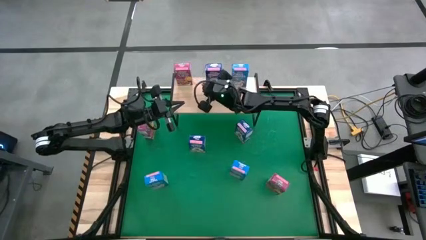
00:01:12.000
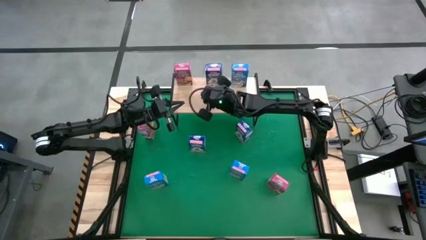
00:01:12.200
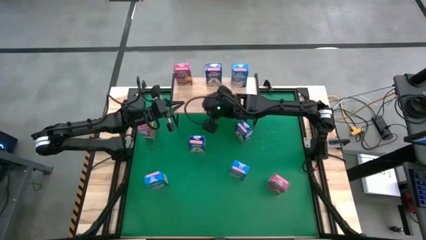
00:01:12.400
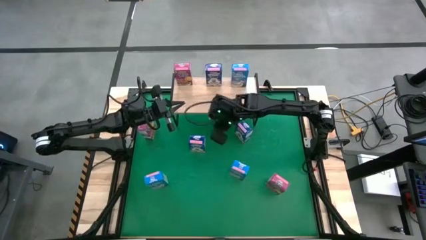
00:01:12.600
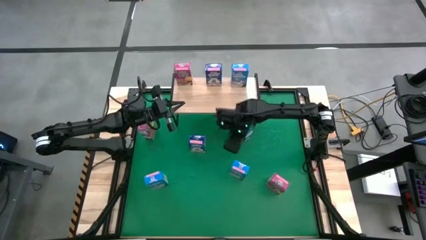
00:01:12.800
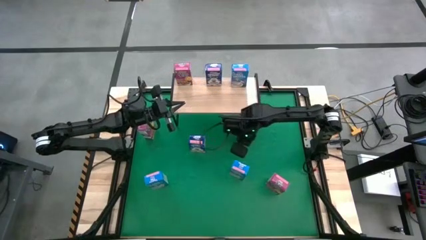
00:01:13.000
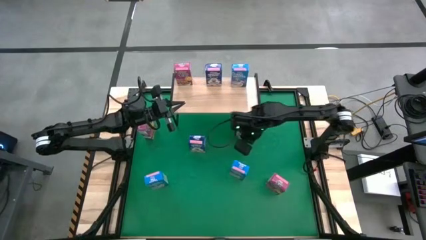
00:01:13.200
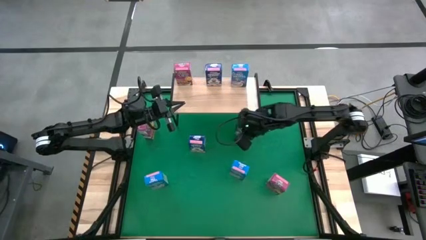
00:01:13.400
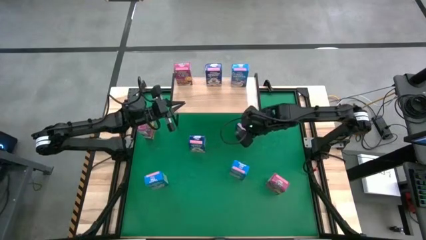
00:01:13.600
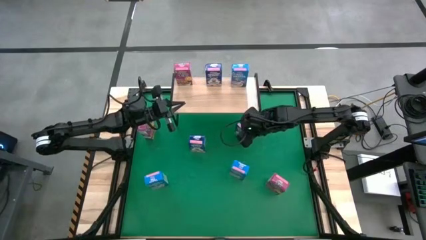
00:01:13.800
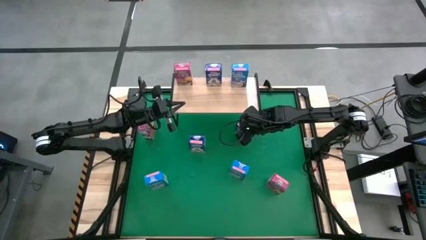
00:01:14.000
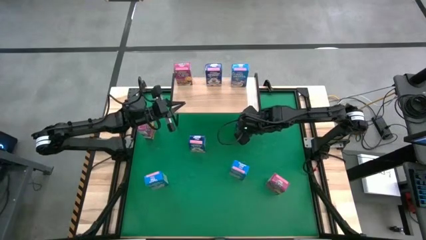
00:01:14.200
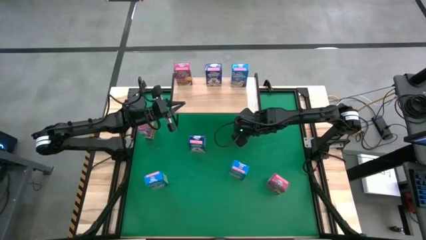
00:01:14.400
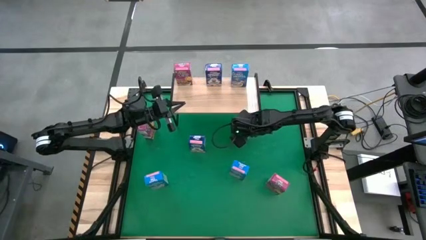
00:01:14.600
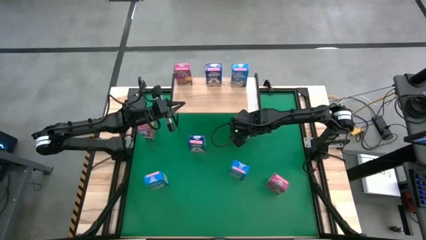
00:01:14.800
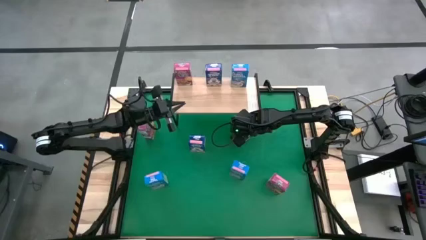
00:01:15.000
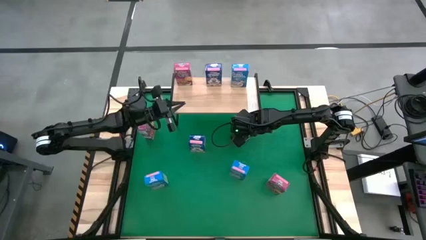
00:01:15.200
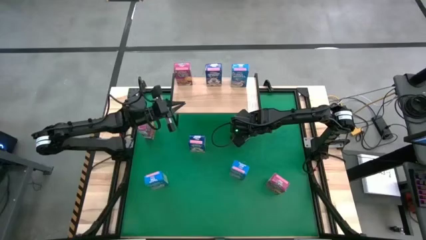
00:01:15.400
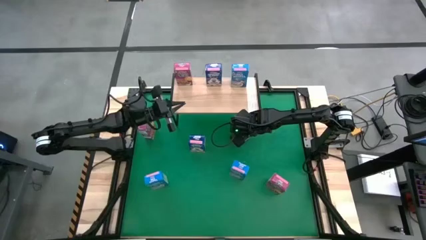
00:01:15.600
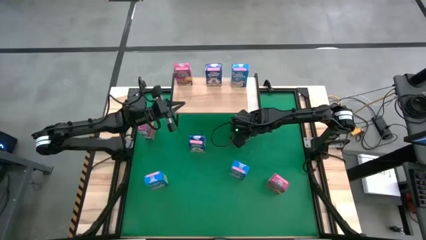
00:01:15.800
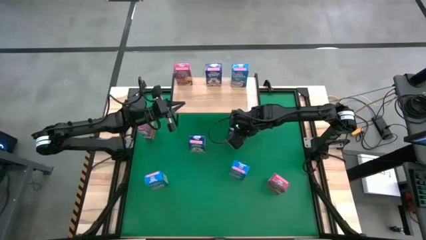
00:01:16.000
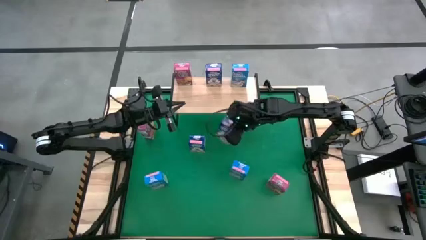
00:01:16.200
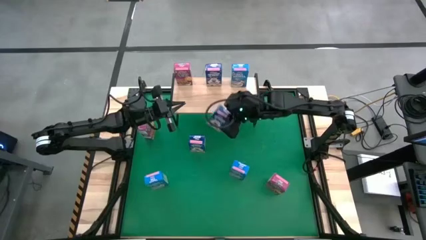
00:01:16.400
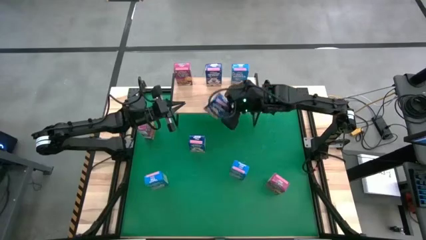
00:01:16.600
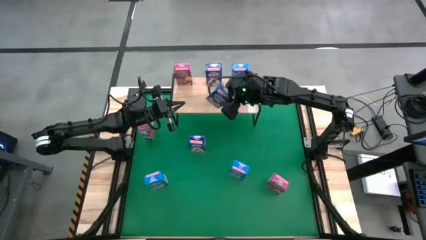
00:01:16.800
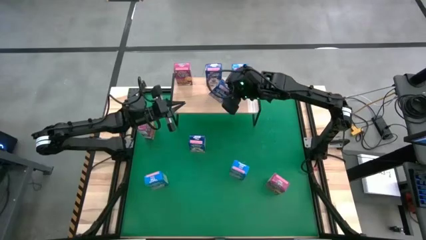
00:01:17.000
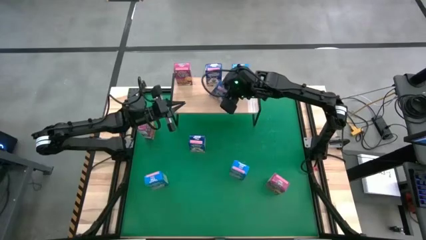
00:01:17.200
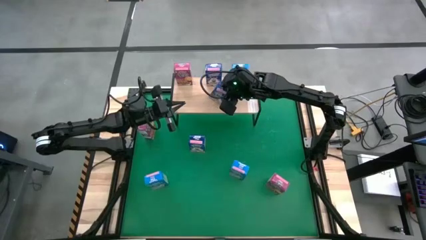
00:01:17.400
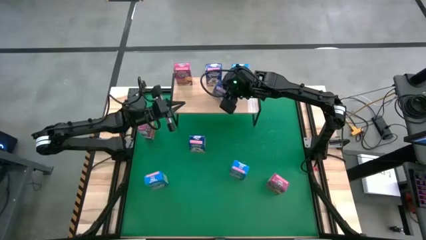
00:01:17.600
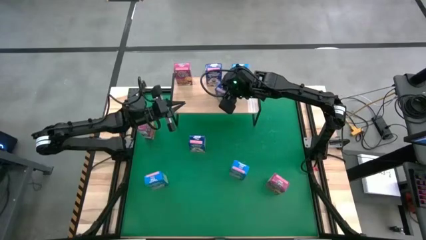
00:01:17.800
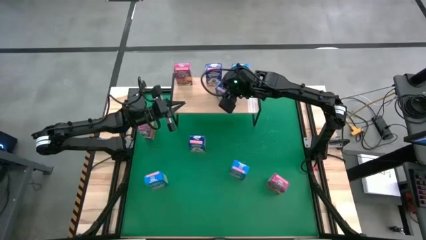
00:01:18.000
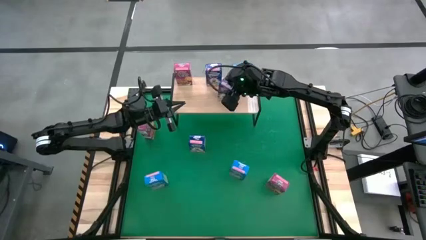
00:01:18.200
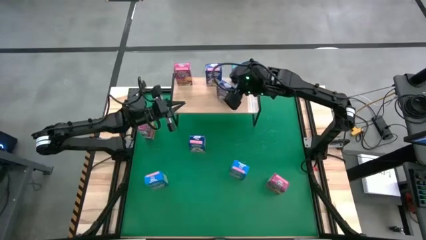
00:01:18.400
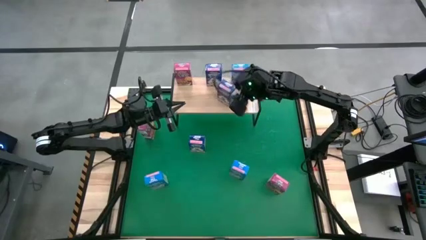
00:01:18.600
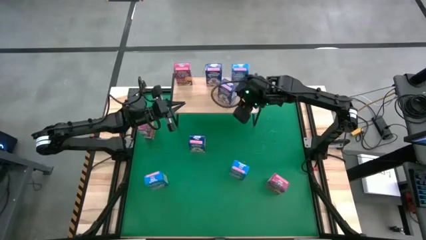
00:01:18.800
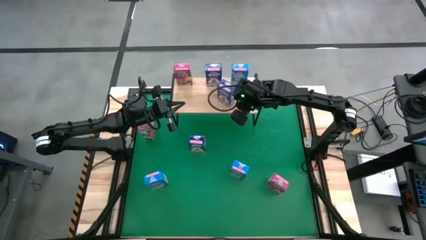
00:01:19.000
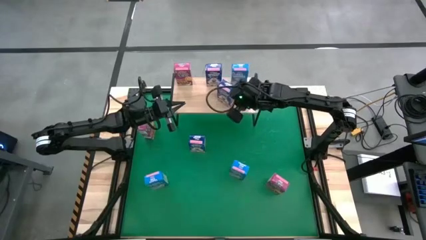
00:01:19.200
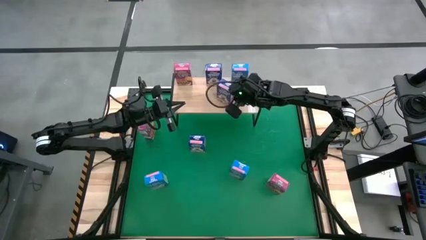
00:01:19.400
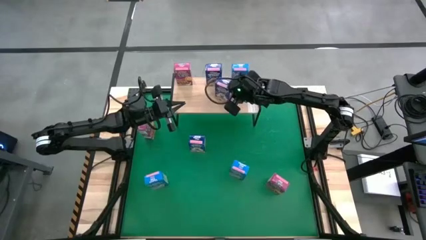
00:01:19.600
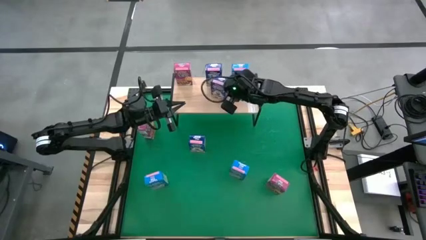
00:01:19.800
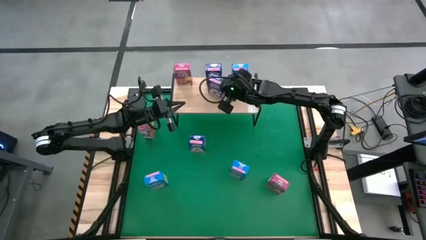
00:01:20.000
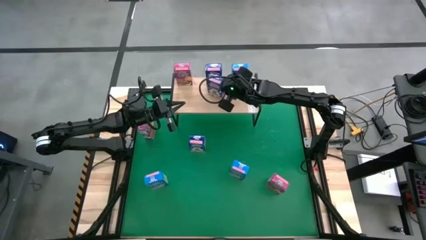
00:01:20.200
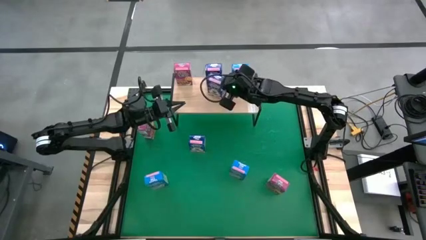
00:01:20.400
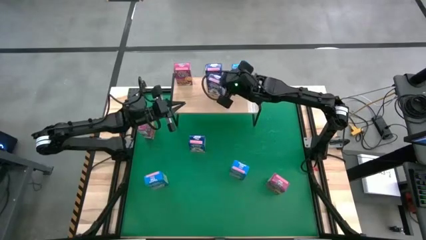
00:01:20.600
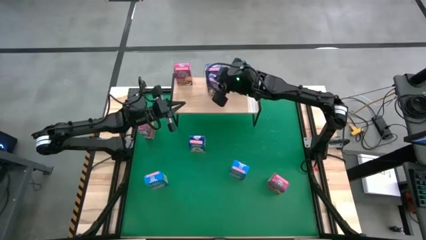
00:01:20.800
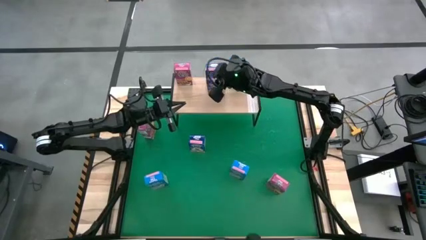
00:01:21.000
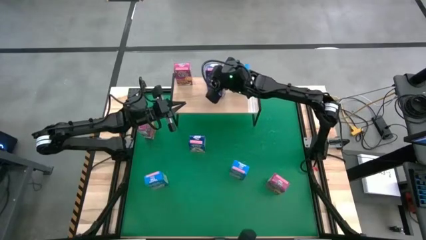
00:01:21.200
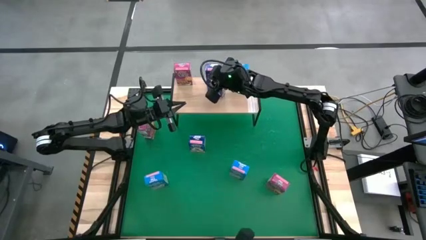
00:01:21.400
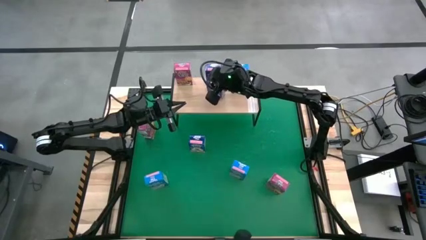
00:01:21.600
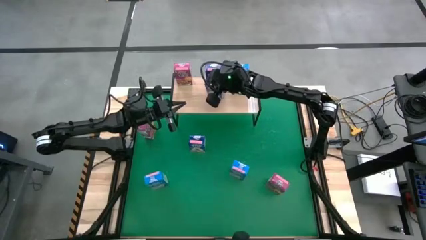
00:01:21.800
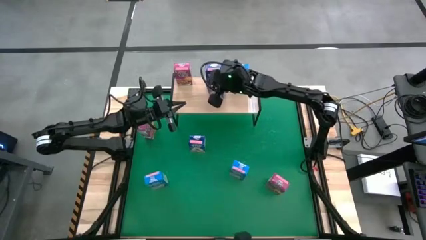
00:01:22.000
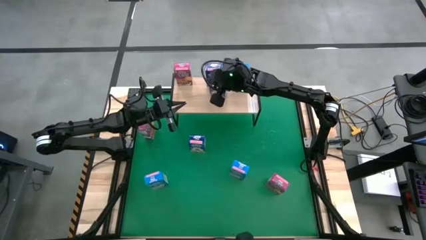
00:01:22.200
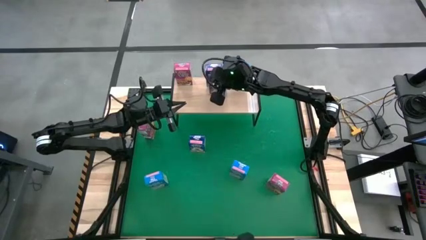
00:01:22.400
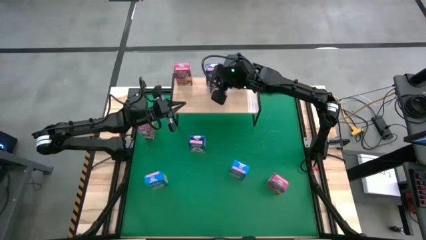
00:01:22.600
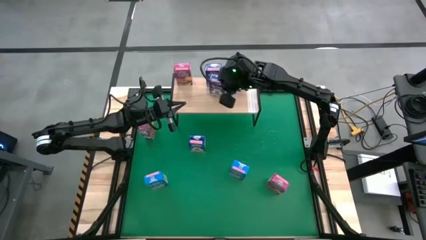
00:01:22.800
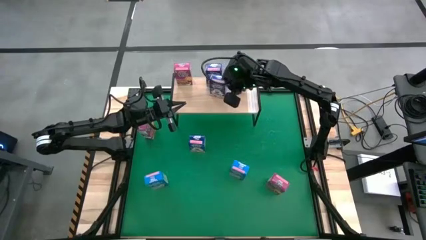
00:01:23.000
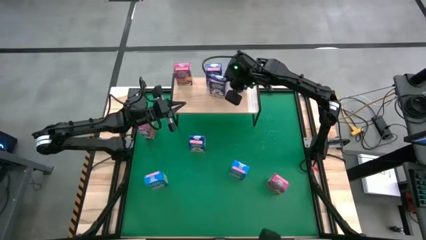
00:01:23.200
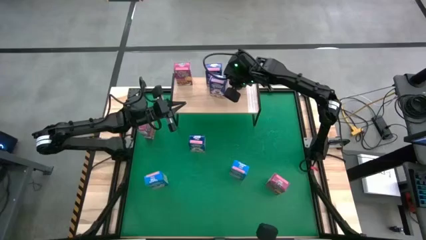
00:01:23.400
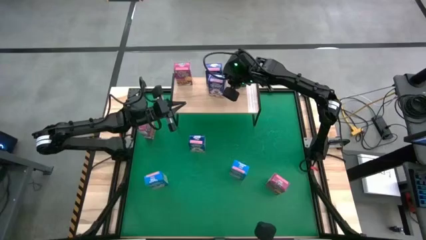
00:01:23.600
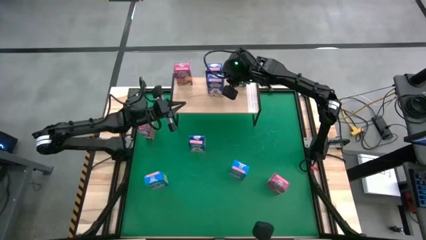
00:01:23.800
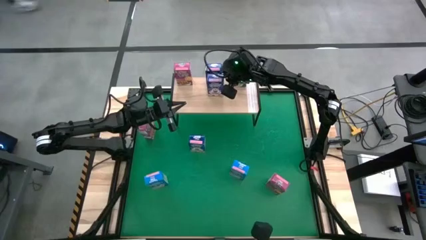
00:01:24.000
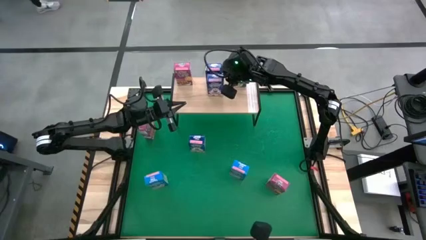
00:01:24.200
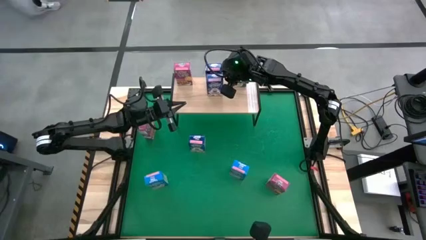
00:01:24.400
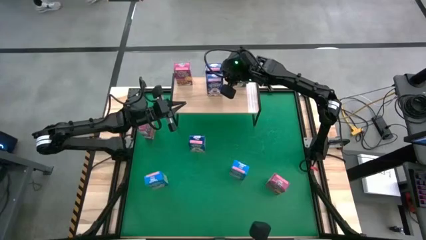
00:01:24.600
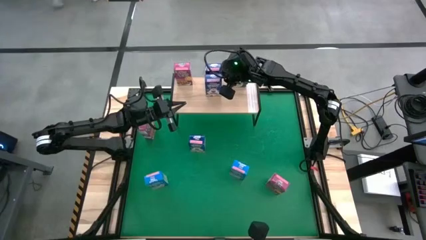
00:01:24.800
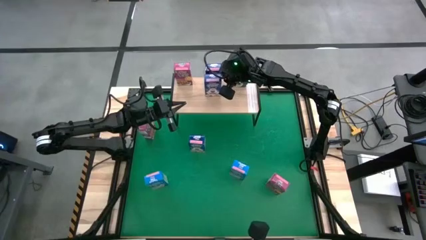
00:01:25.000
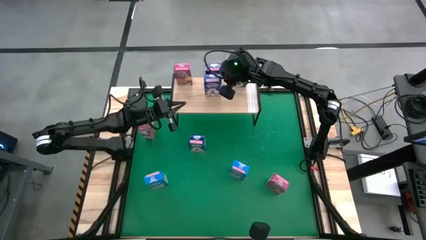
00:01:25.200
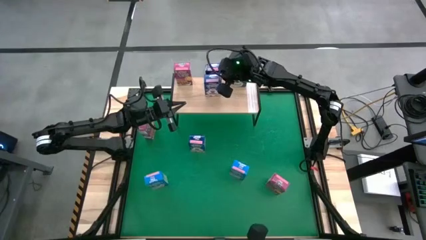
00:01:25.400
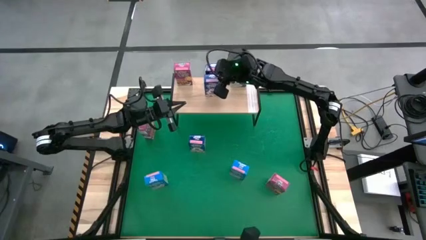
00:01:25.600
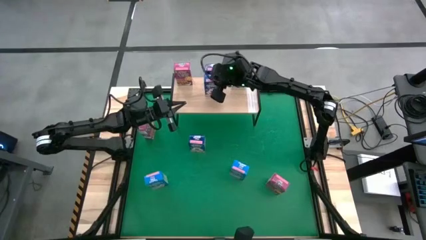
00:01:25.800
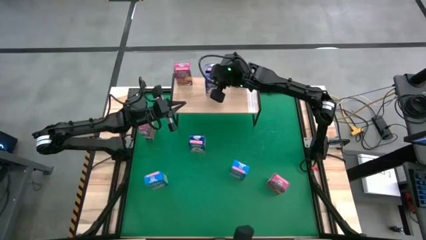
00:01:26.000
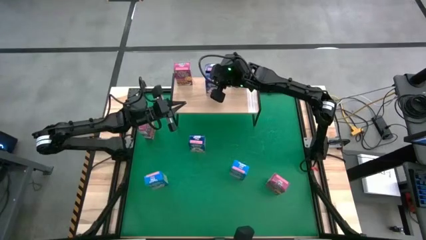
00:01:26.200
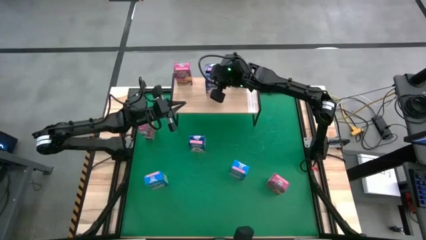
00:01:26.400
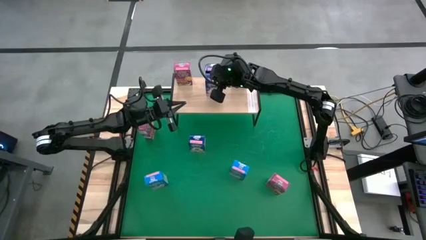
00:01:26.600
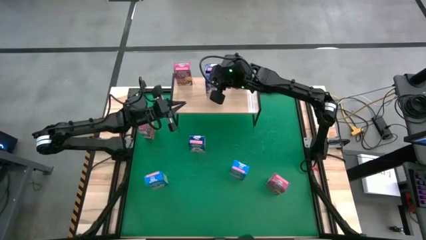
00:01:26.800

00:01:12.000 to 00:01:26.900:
Task: Stack cereal on shelf
Put the right blue cereal box on the shelf aligned with the other blue cereal box

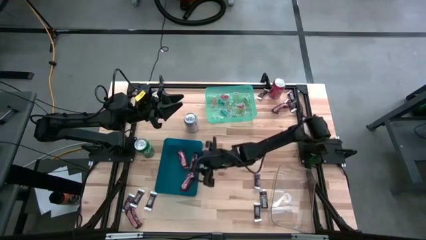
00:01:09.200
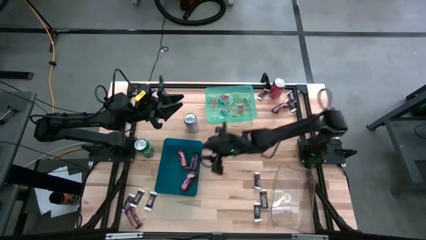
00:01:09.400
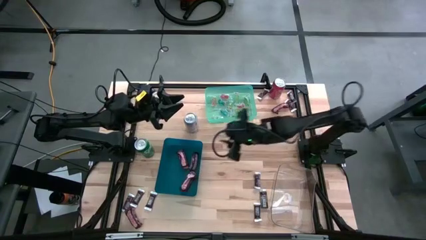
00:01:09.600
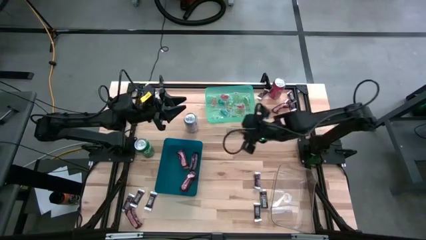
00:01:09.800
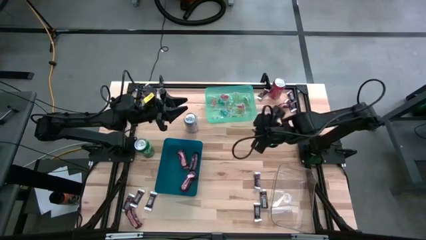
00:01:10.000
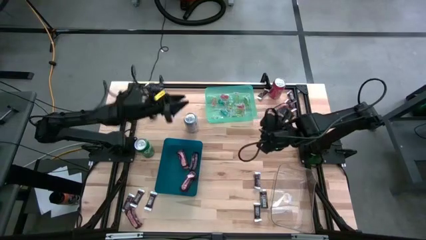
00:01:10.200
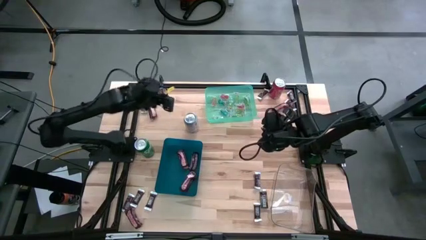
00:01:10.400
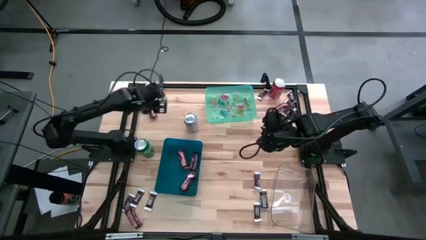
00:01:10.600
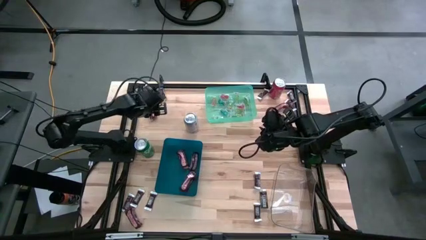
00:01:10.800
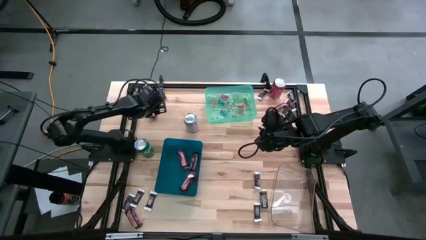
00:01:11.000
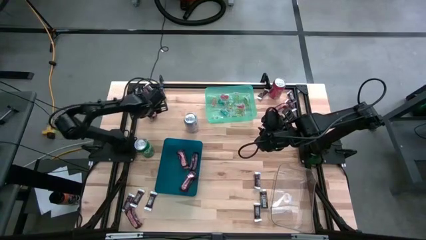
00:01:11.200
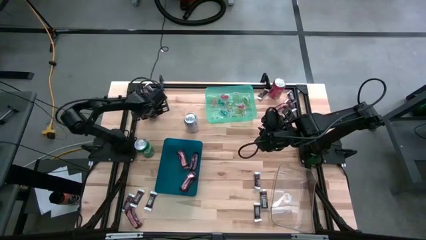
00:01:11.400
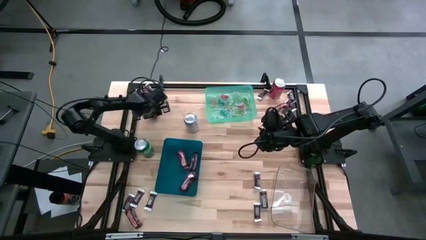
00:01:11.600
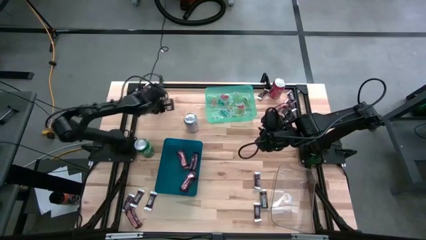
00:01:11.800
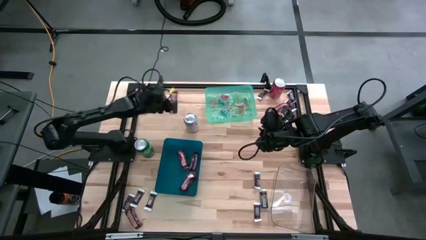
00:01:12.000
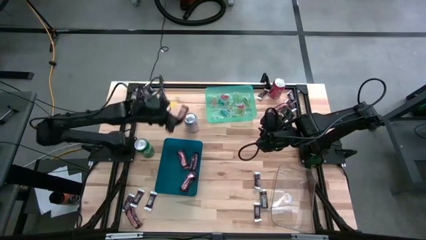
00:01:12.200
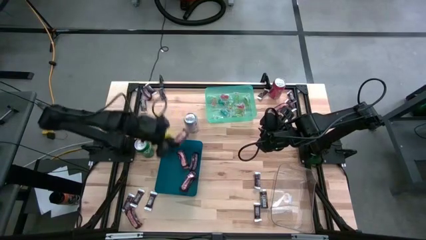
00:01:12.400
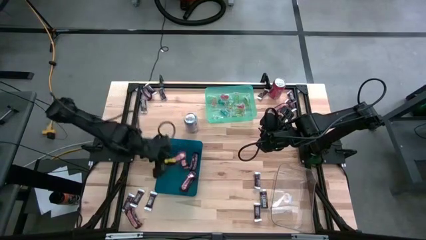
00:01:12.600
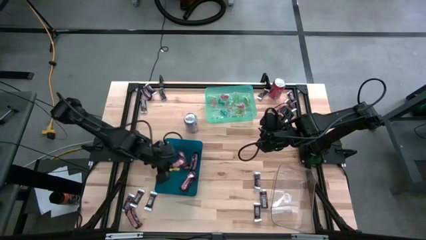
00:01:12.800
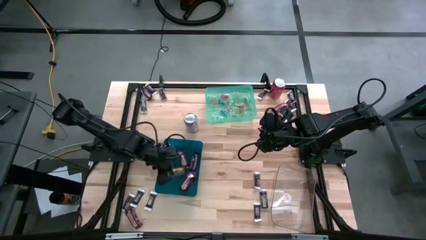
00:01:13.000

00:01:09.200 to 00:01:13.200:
Task: Organize candy in baskets
Put the brown chocolate into the blue bin
